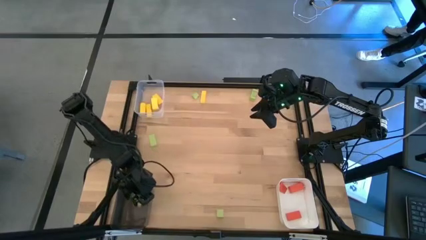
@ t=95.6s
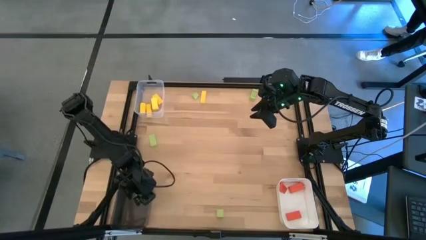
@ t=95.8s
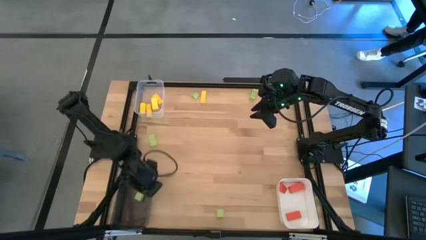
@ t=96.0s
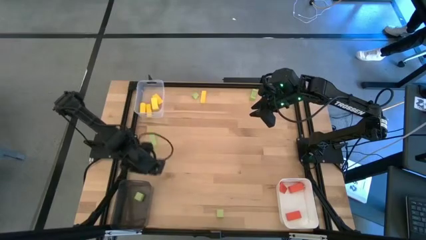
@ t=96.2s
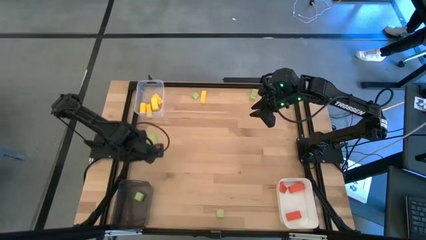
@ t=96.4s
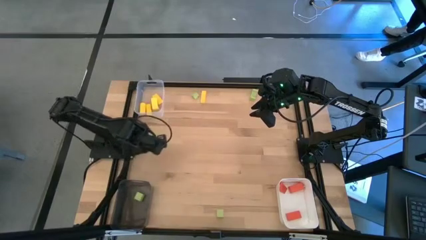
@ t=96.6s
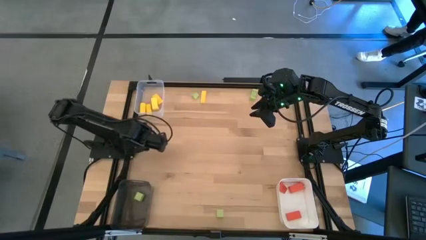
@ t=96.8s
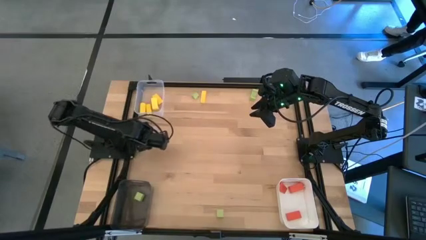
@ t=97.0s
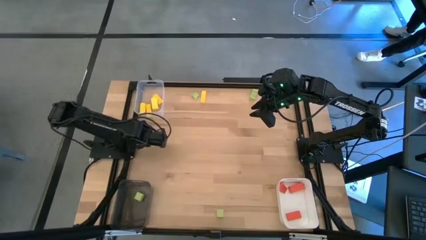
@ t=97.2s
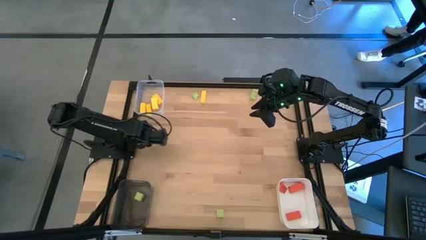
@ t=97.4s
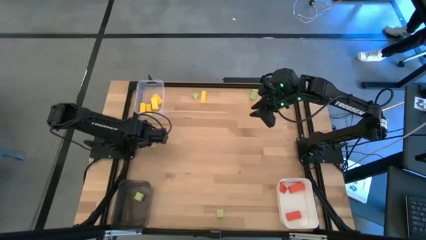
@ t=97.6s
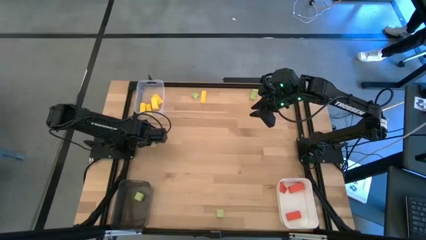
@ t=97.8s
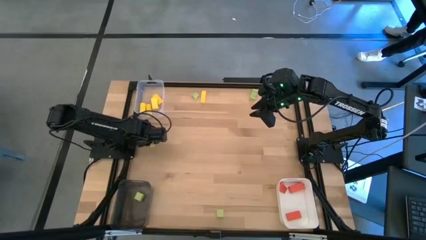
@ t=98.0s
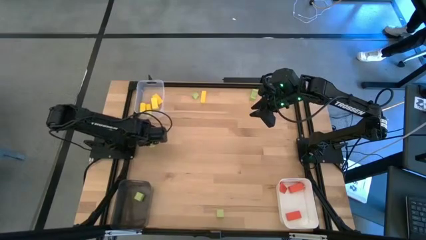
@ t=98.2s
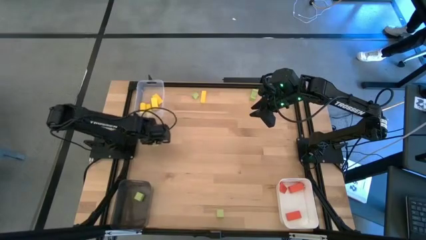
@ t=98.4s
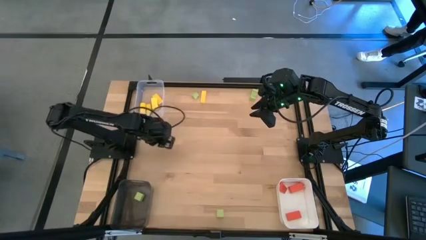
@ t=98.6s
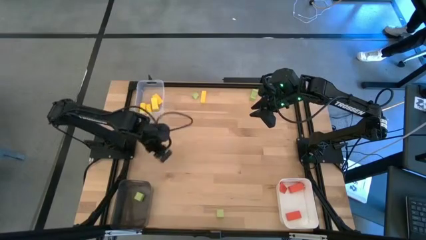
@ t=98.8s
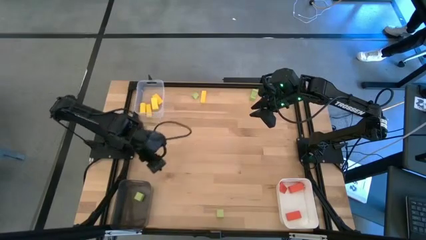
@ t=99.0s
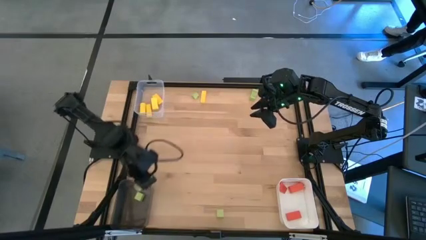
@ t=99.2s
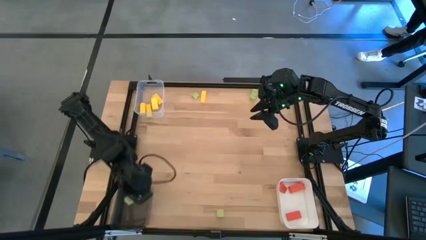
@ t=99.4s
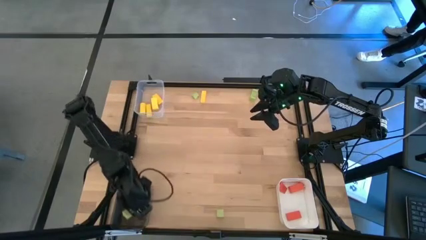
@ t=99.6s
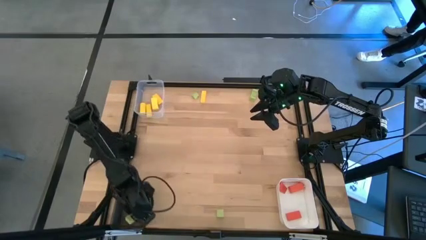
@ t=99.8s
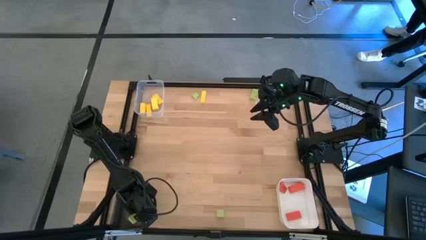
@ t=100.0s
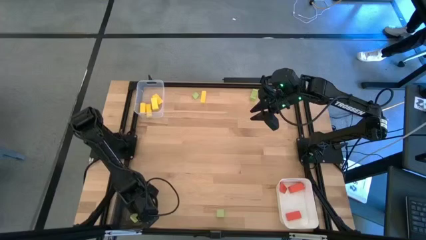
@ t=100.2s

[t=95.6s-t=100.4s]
Task: Sort & place blocks by color
Put the green block into the black bin

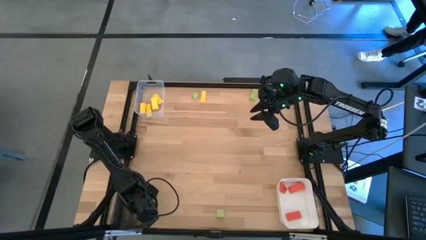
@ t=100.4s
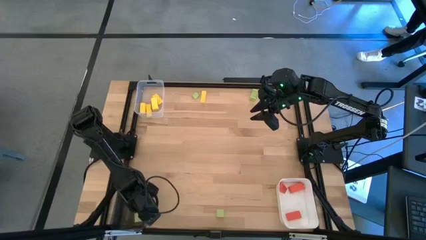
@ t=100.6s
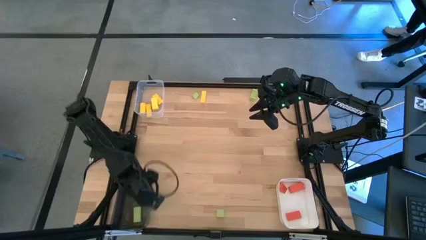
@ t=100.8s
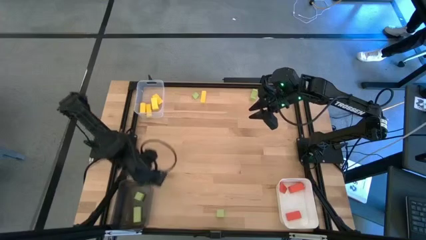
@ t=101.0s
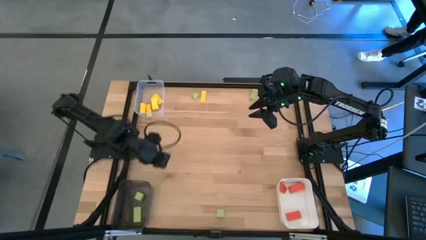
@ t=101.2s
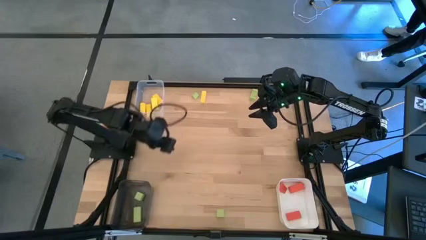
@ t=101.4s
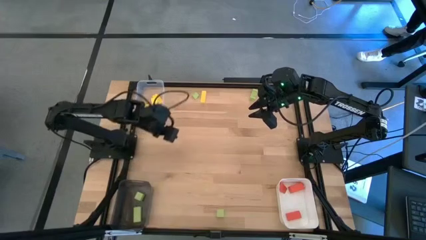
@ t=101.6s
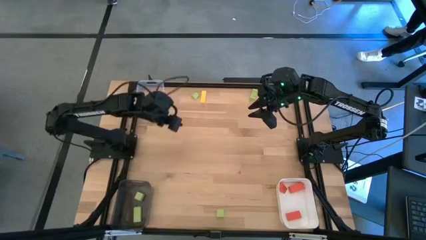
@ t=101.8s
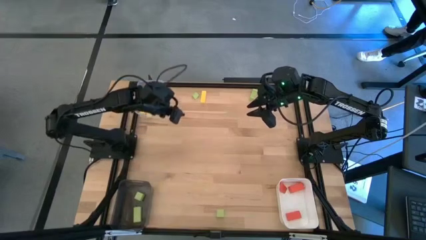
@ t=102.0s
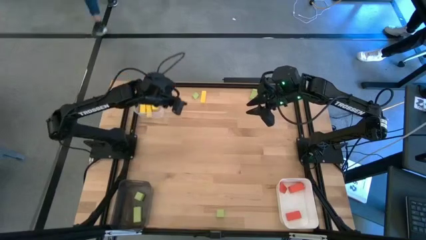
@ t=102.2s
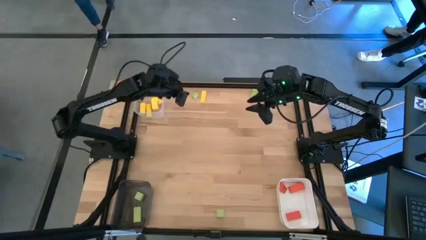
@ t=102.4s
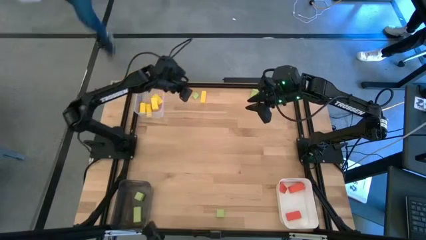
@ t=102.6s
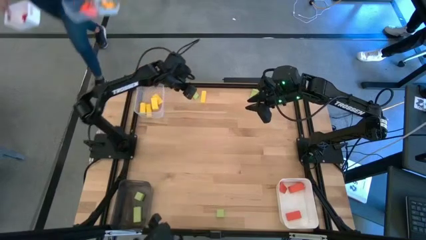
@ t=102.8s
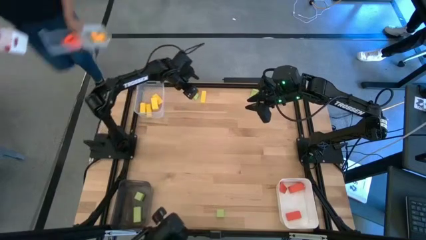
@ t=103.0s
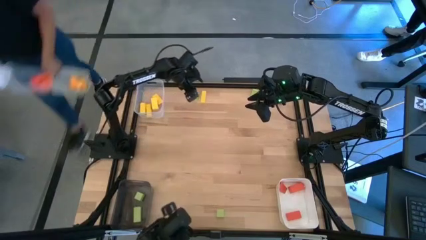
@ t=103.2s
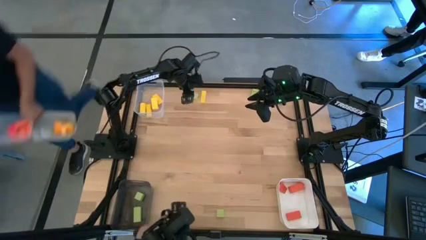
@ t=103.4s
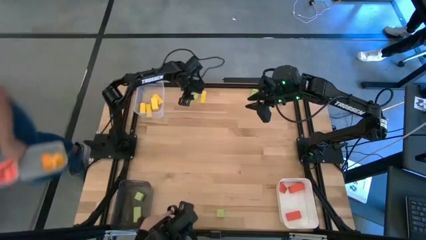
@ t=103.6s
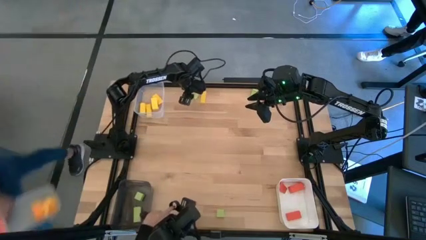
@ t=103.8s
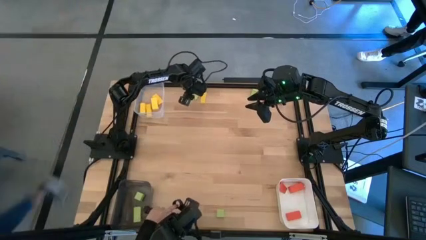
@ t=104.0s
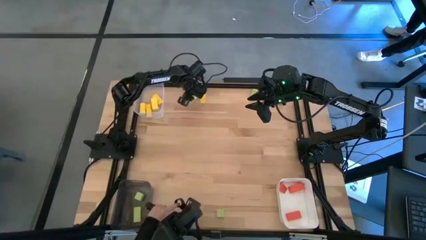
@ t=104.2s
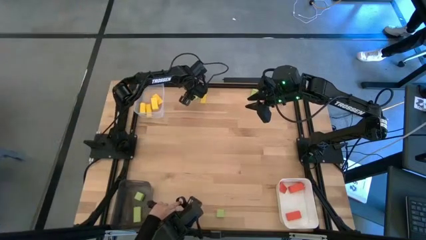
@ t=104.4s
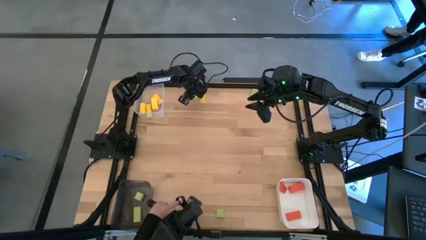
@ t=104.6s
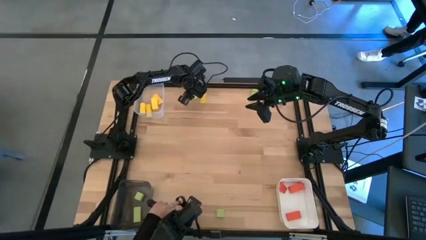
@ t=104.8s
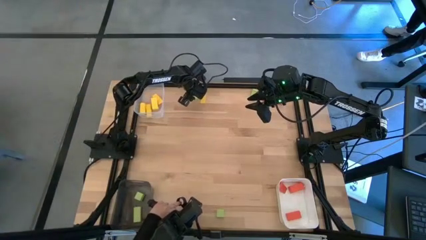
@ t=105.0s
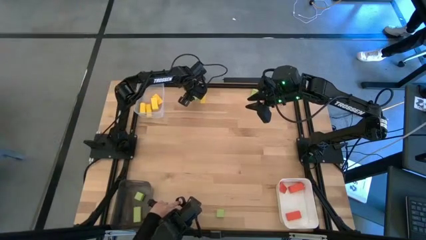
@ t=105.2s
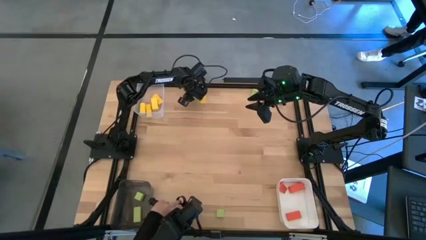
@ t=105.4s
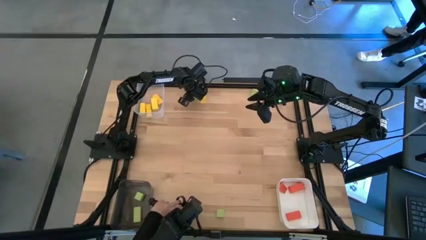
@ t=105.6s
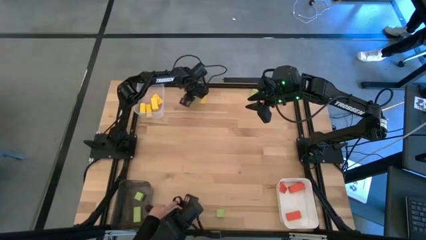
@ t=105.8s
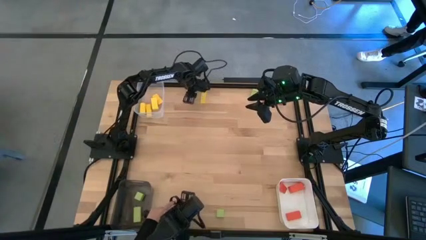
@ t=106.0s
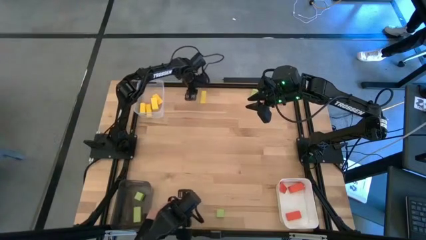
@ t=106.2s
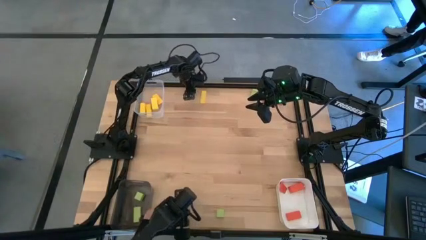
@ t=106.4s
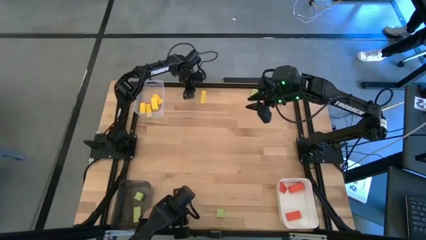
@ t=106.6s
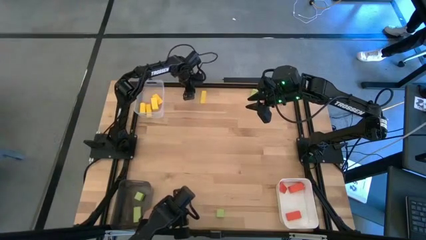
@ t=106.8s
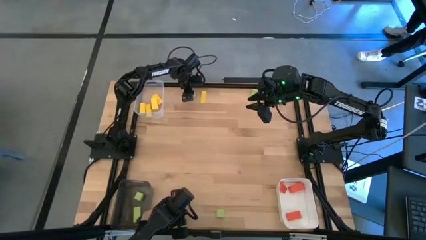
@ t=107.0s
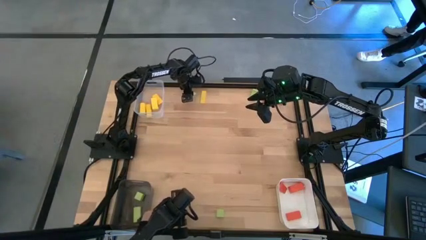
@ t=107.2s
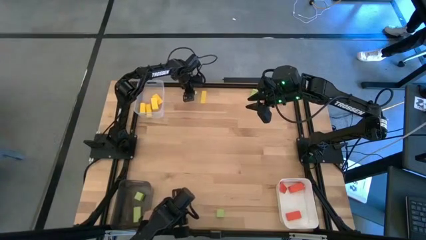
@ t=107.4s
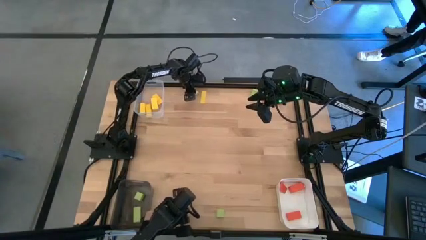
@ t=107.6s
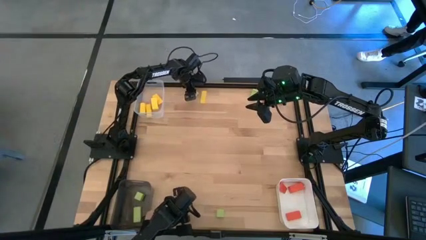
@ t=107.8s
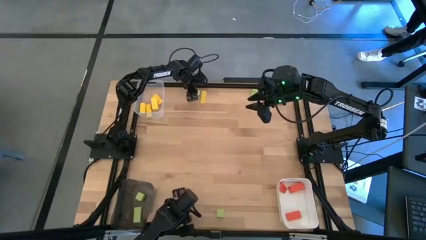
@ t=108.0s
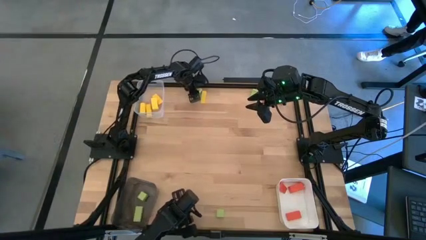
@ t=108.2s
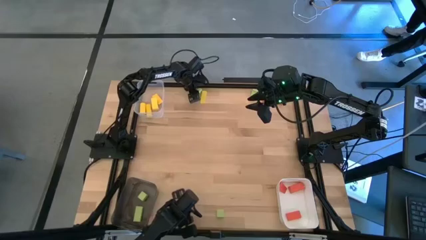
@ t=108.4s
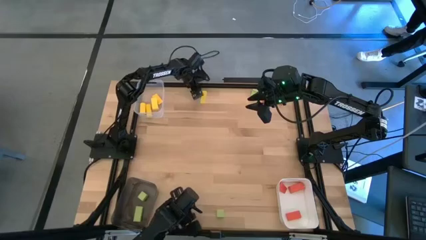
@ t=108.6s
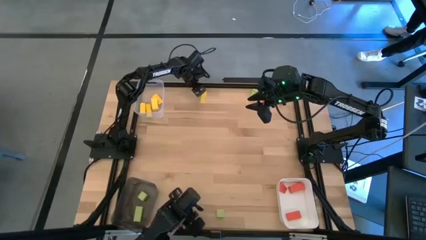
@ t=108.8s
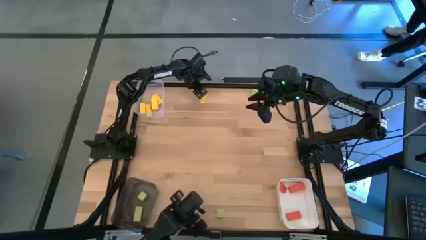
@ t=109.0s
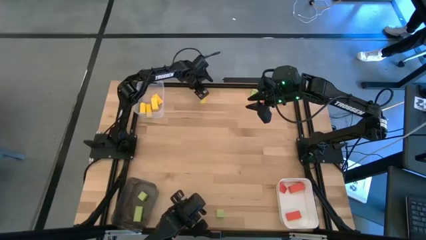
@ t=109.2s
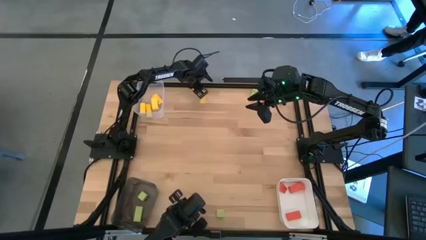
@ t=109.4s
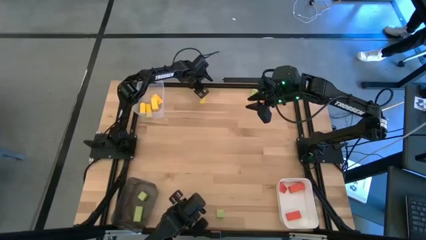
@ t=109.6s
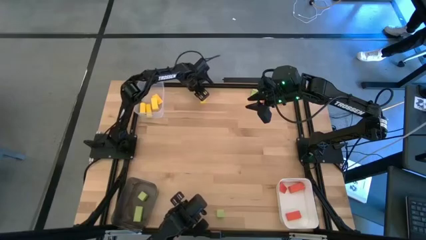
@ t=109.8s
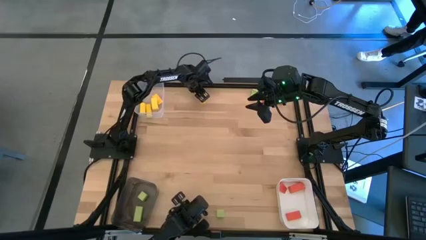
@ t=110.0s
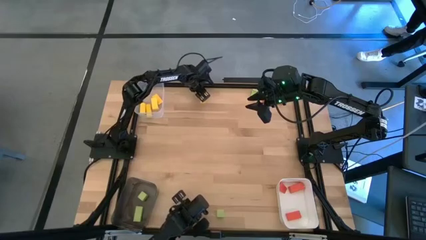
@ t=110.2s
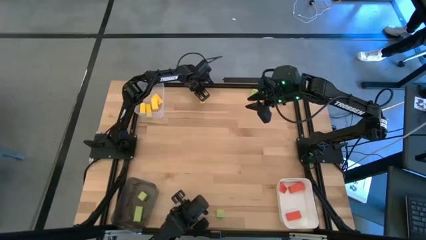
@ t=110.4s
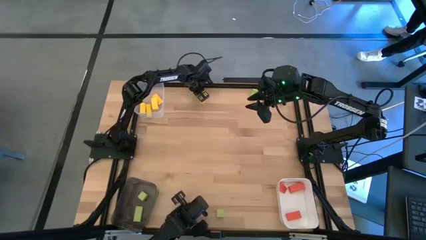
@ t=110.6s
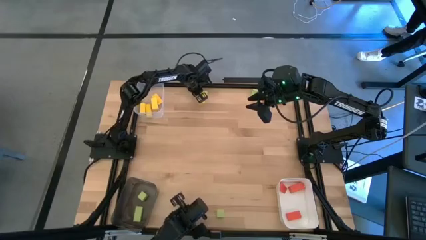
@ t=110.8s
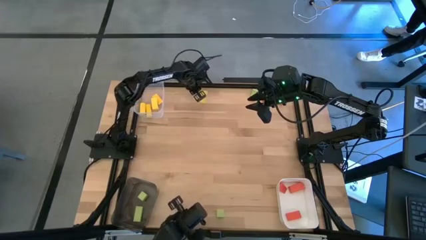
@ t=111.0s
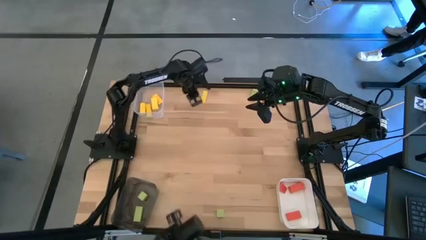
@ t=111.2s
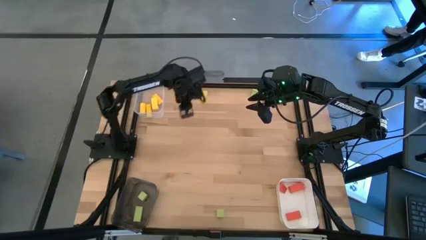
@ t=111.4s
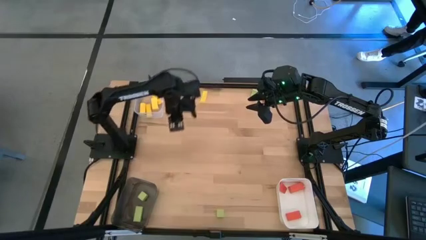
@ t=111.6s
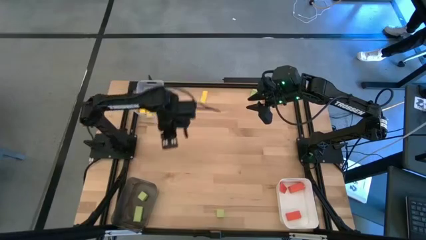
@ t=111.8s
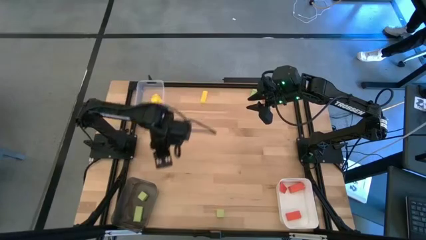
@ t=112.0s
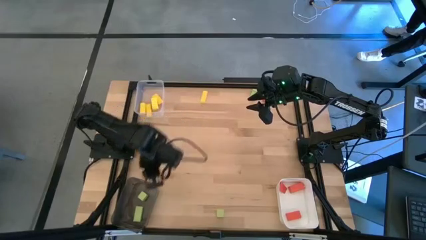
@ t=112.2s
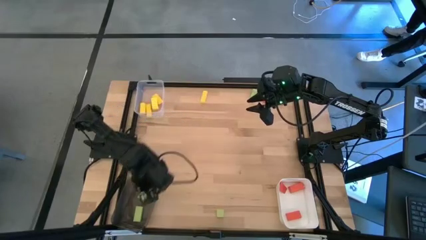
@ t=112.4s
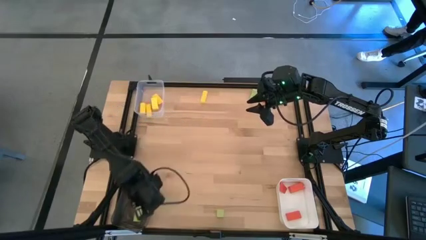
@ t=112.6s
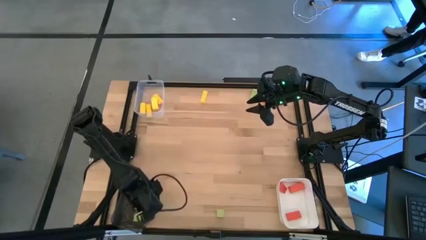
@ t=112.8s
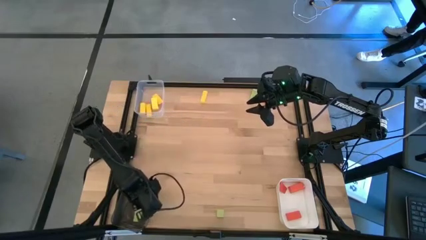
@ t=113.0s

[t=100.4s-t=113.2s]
Put the green block into the black bin
